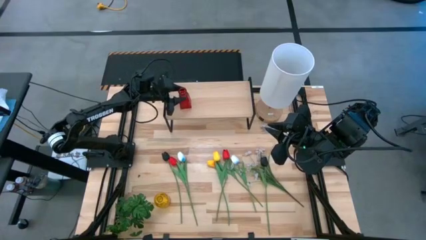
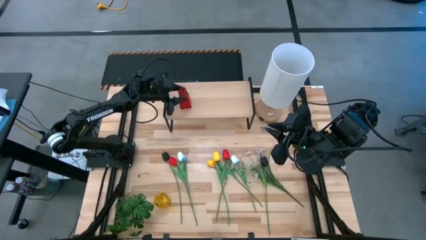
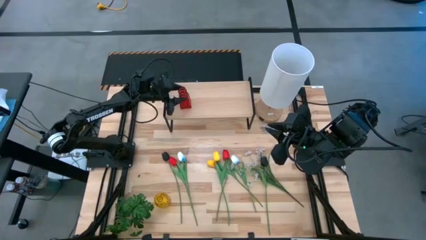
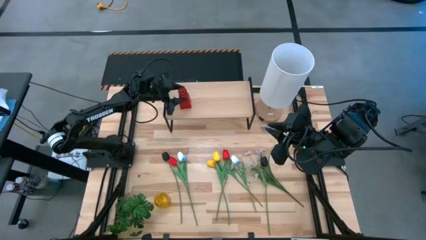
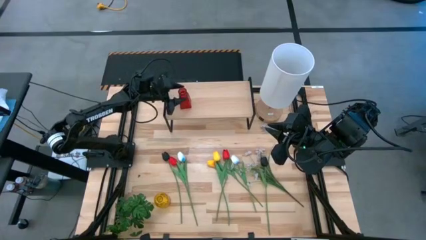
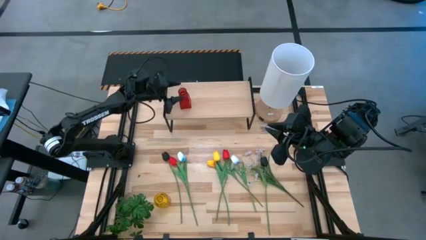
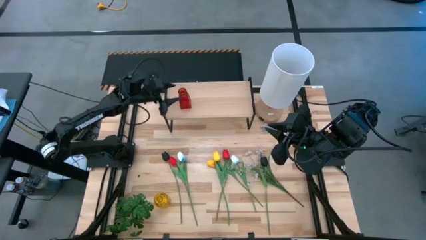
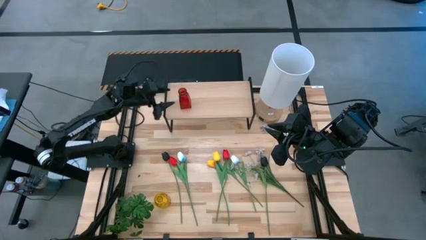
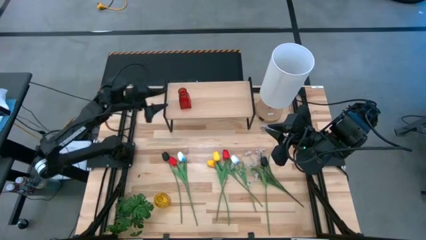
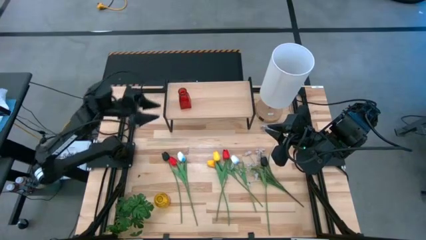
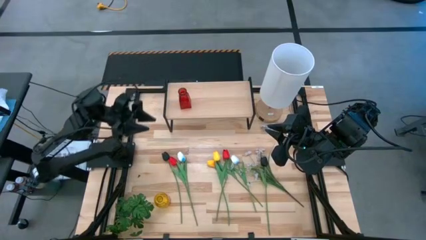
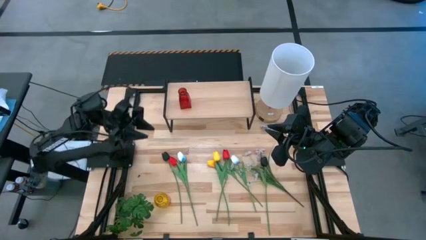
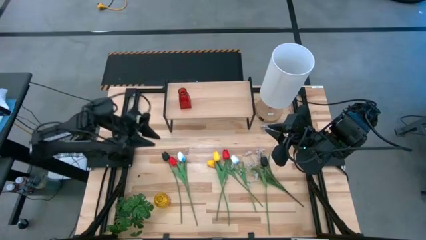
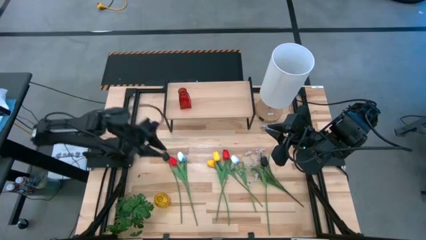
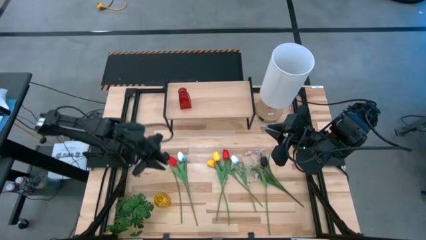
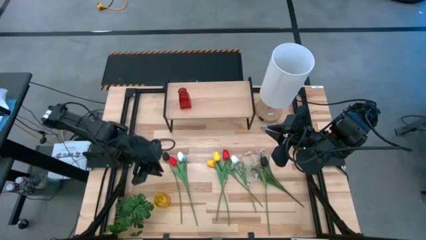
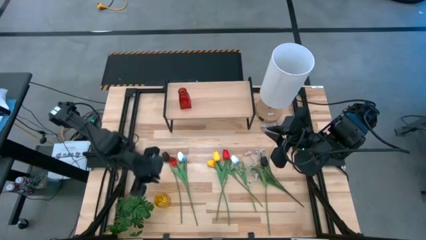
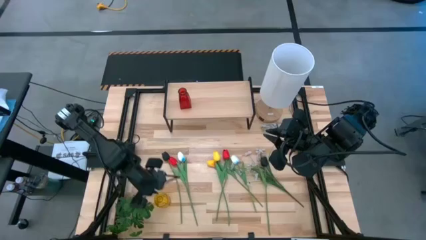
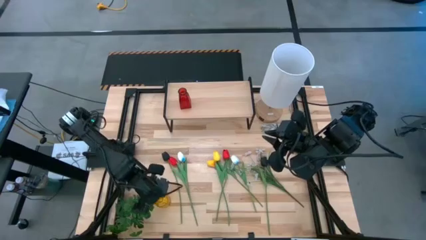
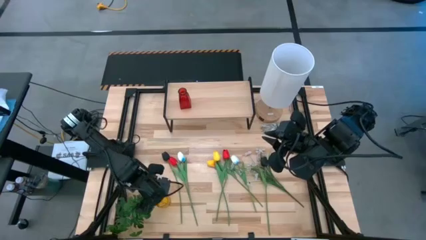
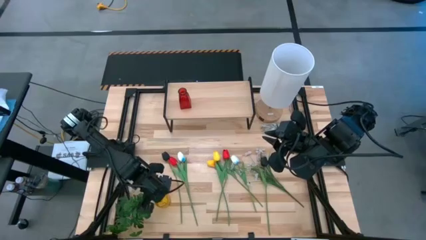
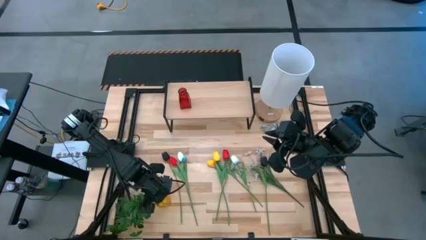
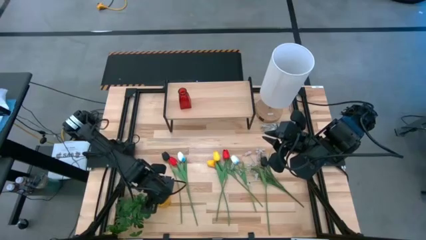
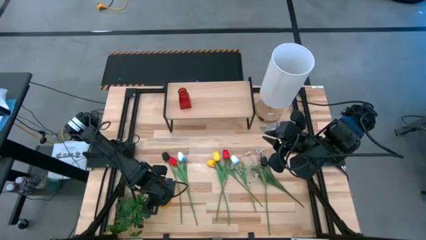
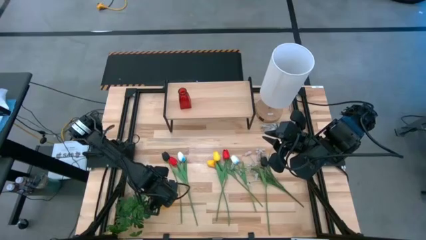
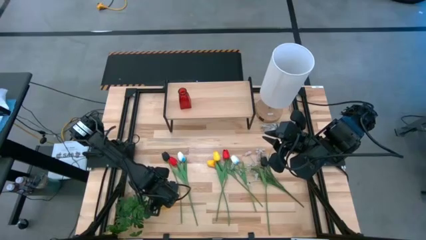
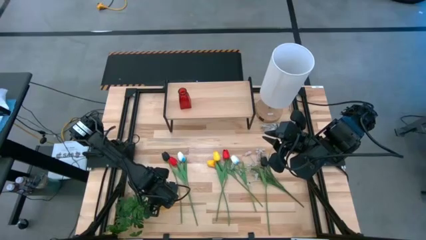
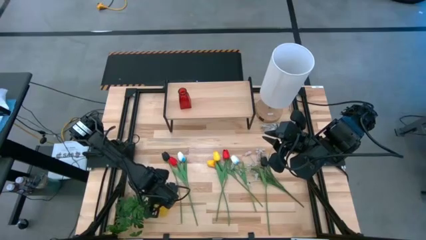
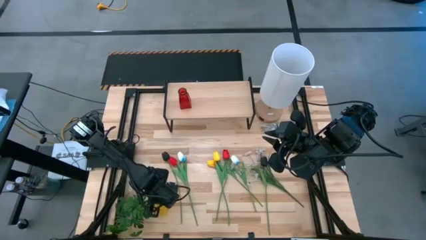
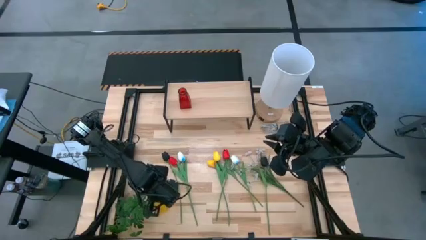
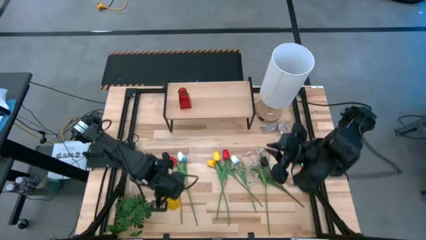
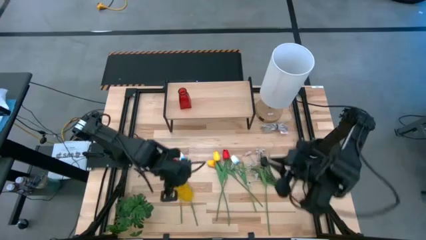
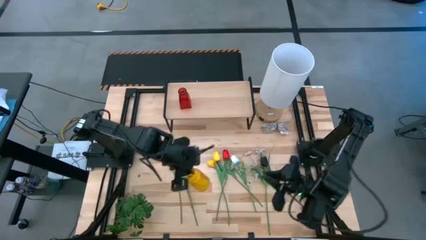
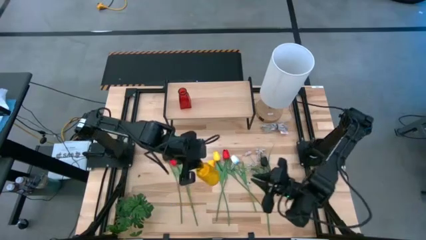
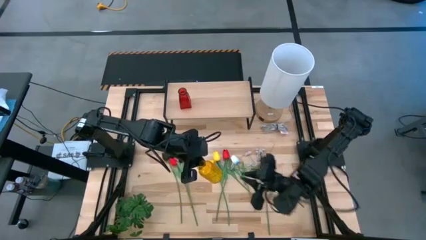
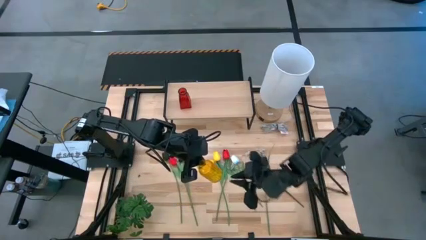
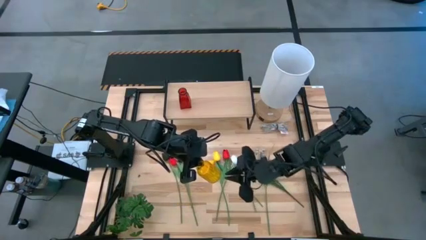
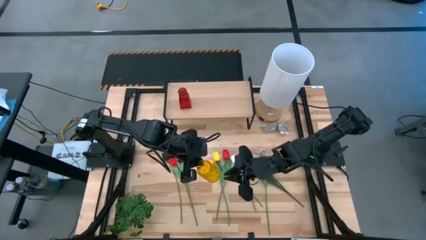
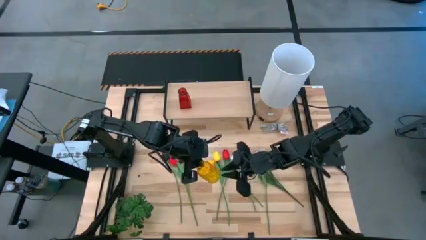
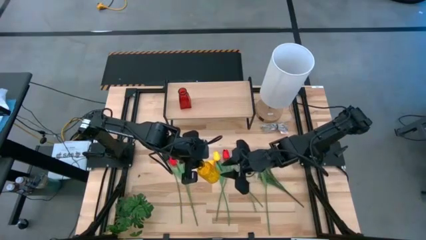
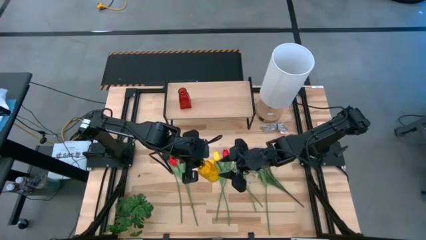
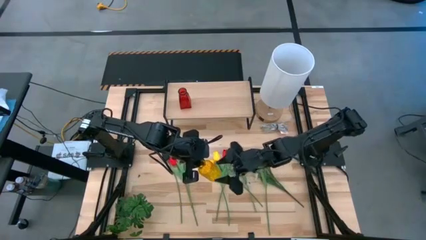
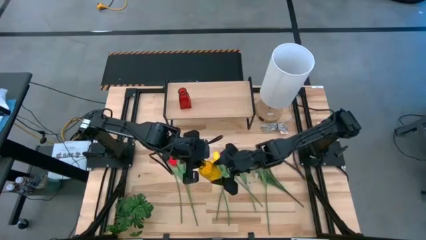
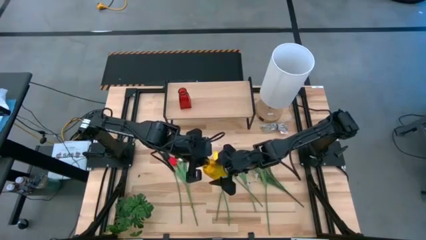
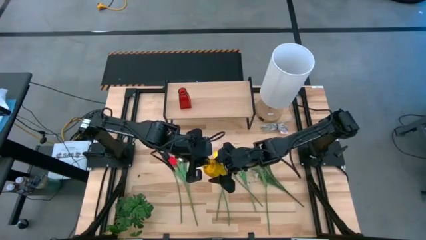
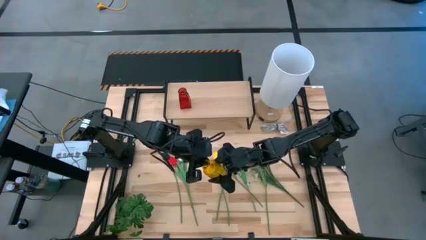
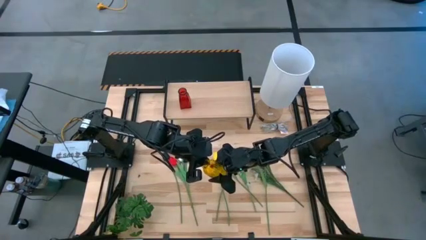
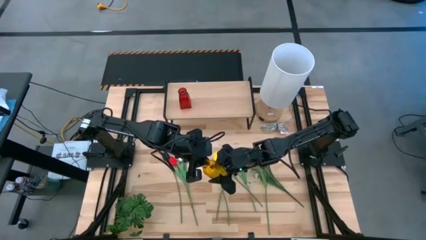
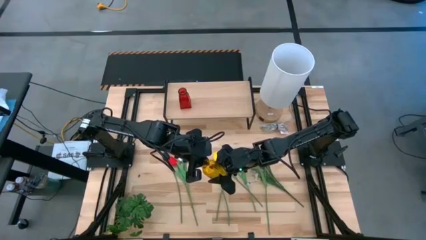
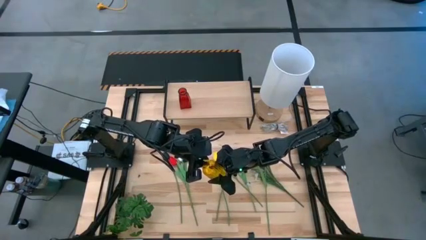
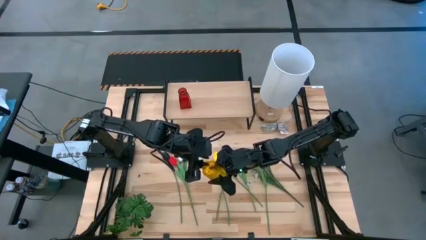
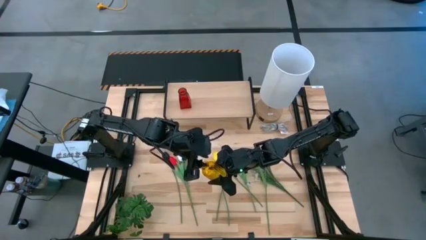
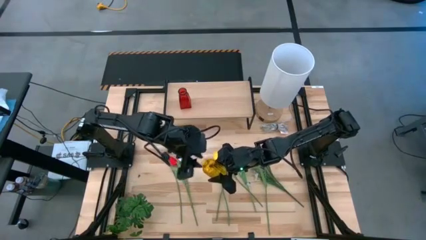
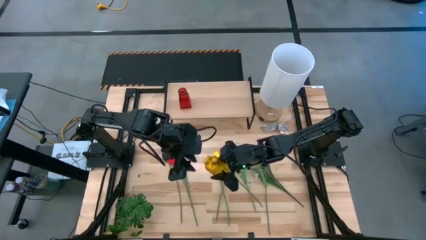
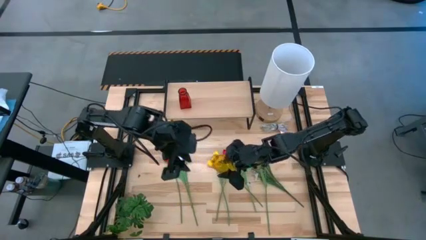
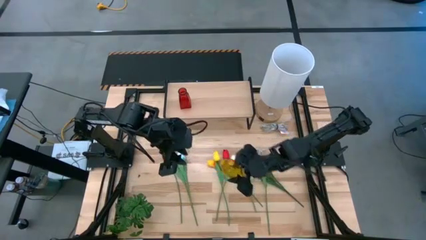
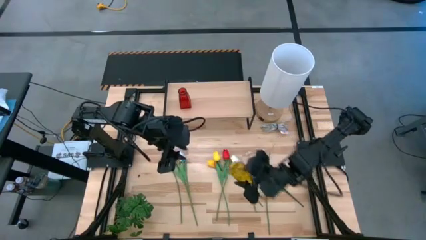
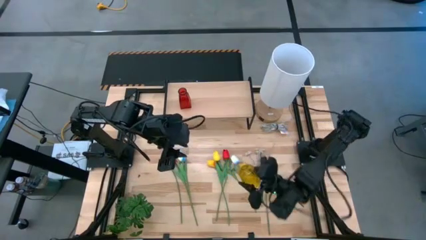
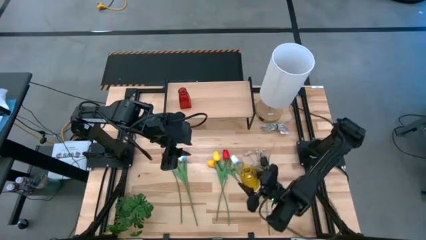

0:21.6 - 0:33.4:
Task: Pick and place flowers into a vace then onto a shelf
Put the yellow flower vase on the shelf

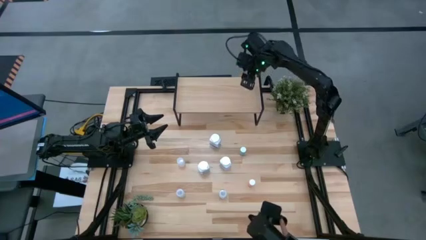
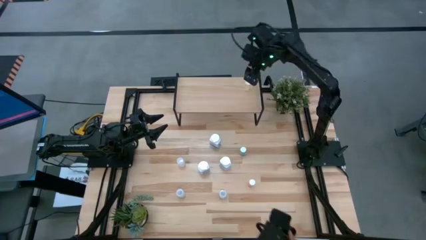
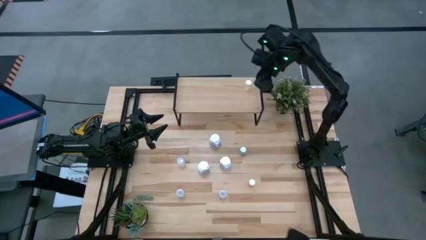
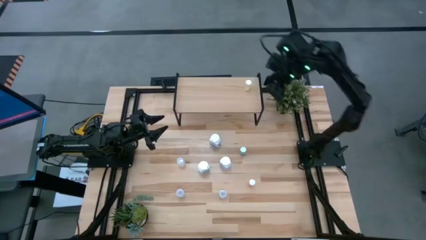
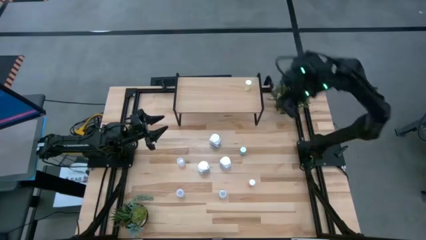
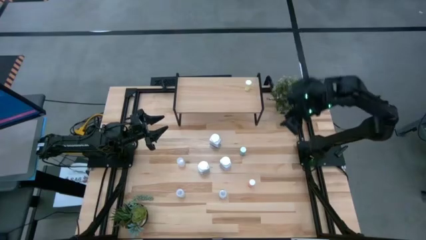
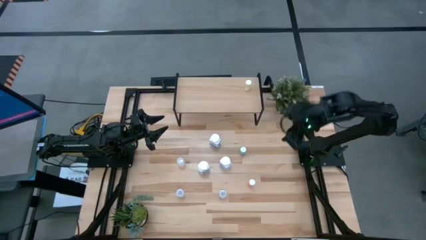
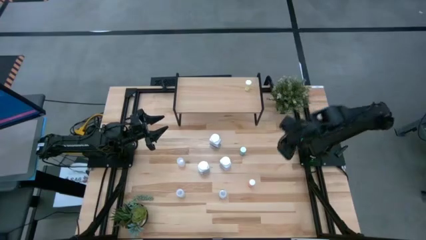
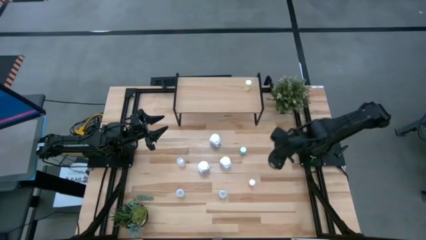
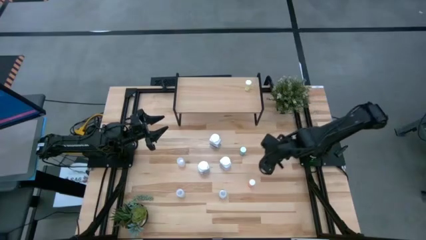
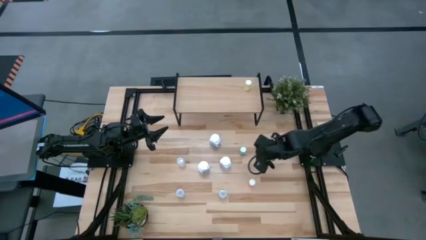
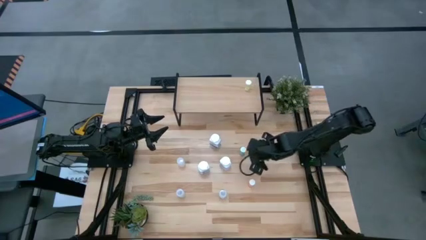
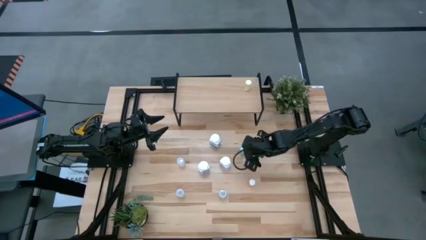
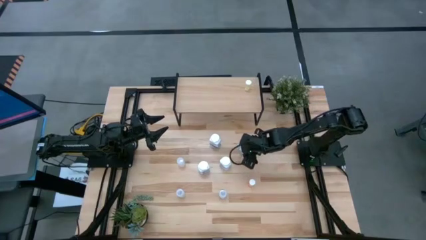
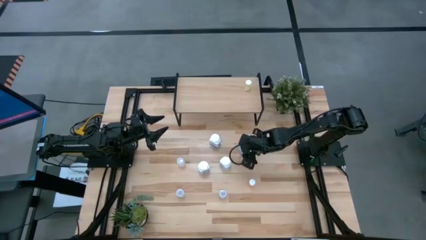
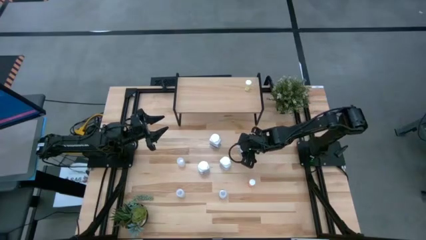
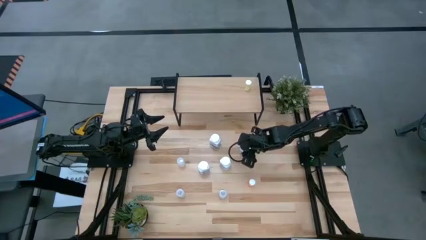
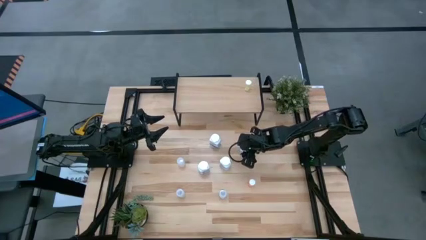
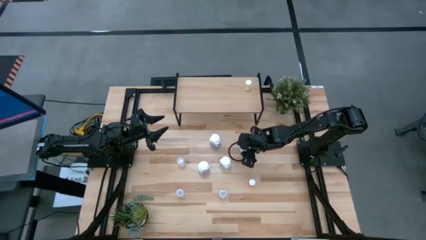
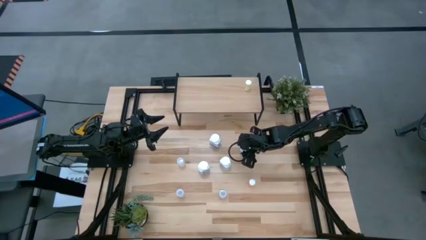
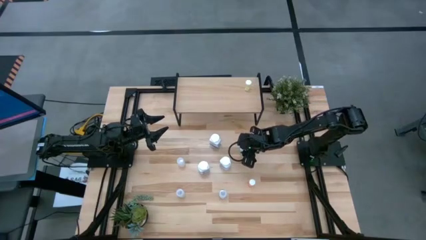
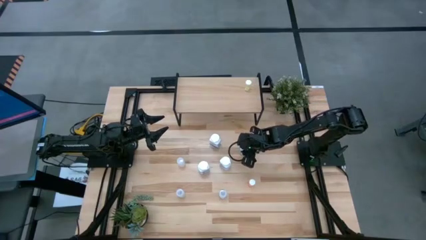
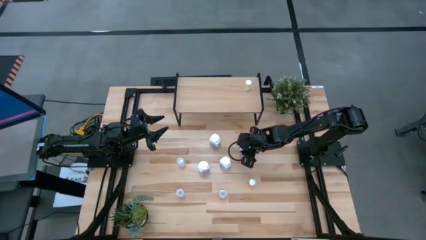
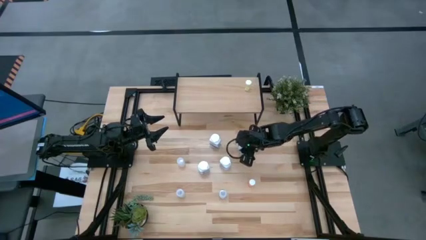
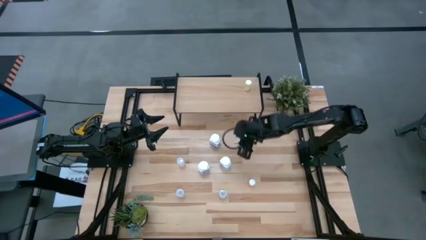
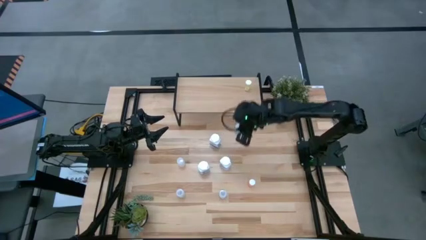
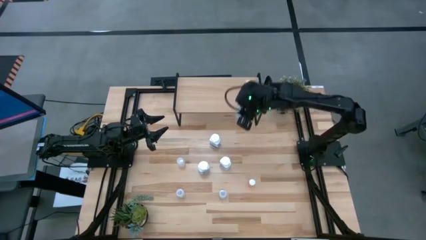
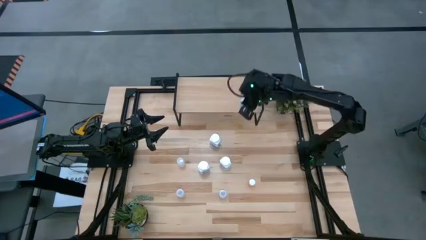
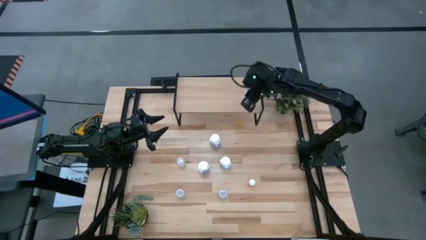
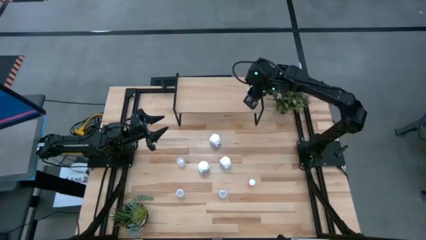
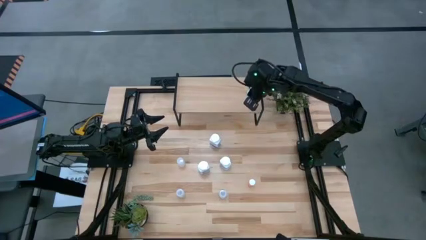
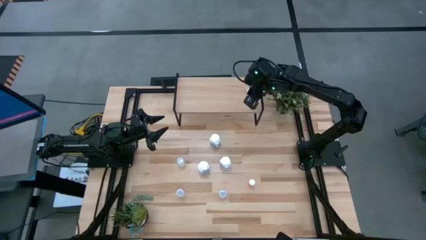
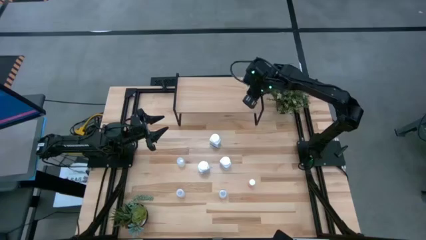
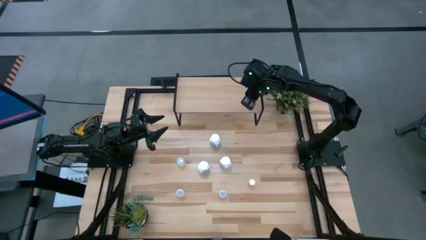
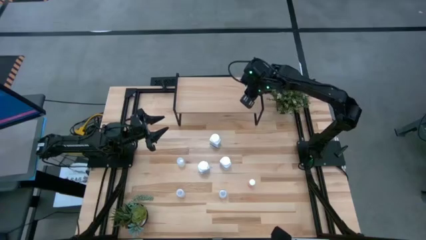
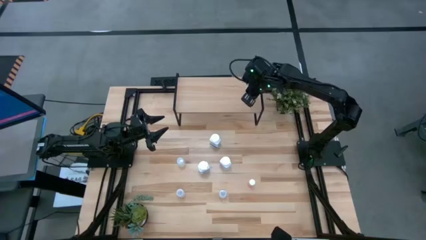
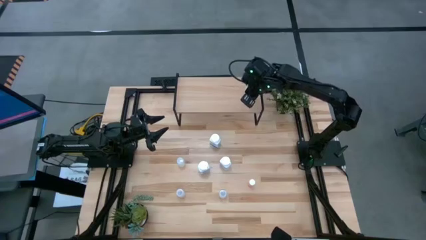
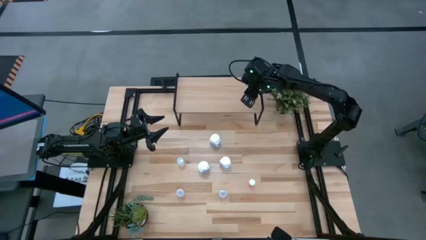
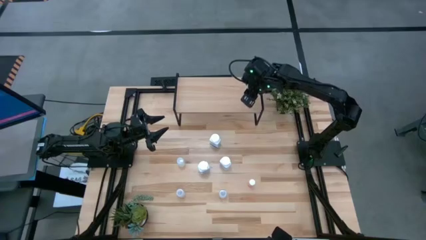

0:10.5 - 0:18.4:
Task: Pick and place medicine bottles onto shelf by color
Put the blue medicine bottle on the shelf
